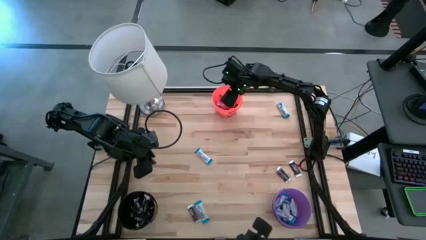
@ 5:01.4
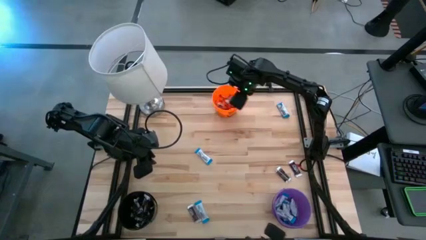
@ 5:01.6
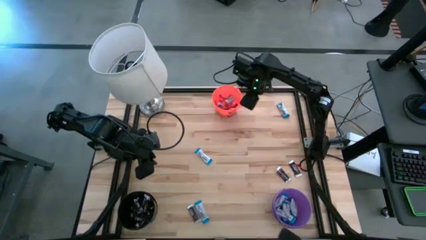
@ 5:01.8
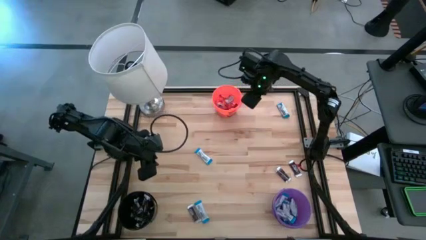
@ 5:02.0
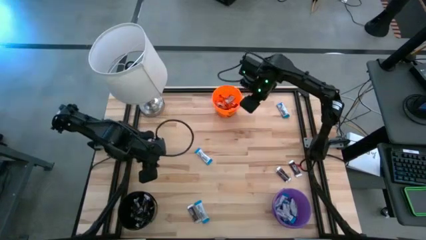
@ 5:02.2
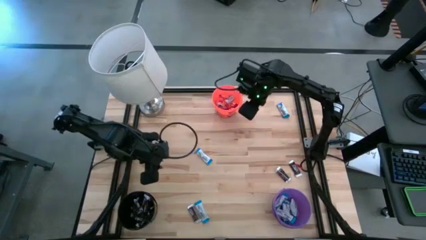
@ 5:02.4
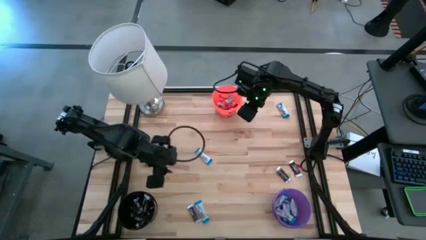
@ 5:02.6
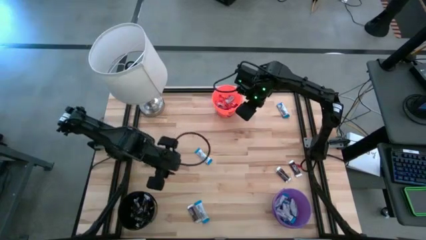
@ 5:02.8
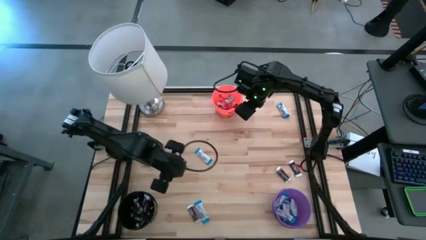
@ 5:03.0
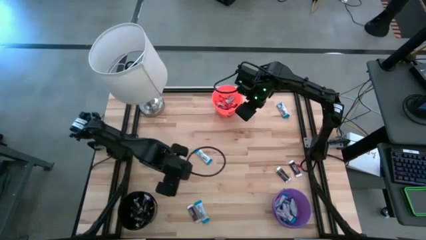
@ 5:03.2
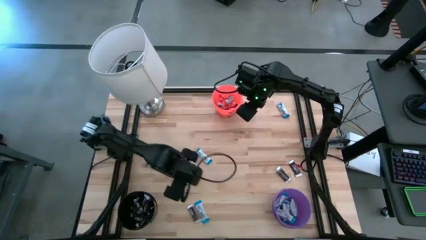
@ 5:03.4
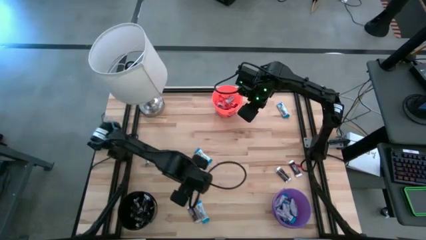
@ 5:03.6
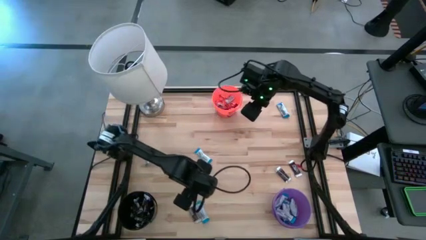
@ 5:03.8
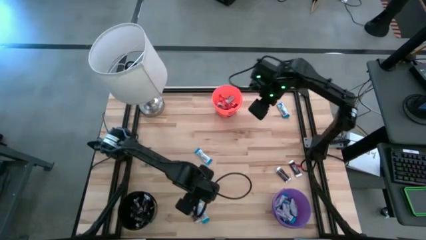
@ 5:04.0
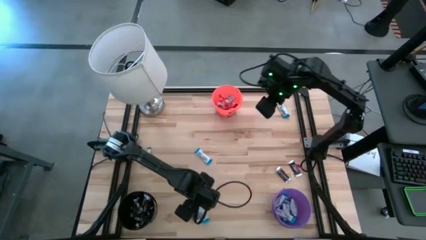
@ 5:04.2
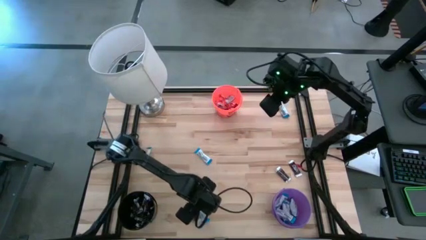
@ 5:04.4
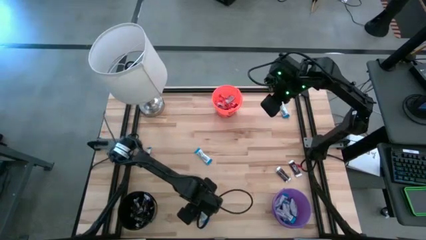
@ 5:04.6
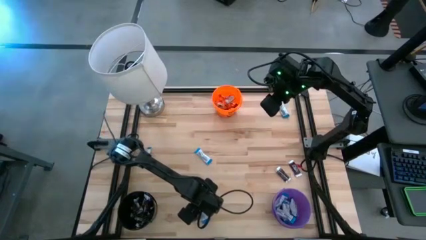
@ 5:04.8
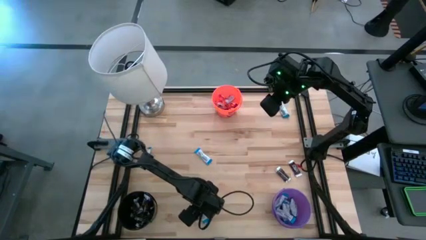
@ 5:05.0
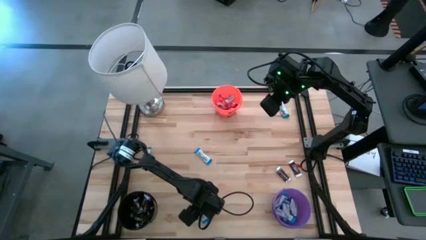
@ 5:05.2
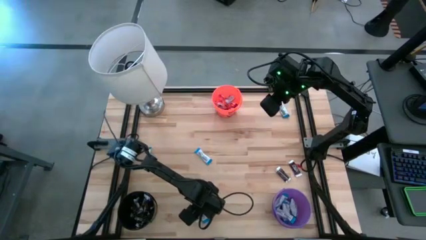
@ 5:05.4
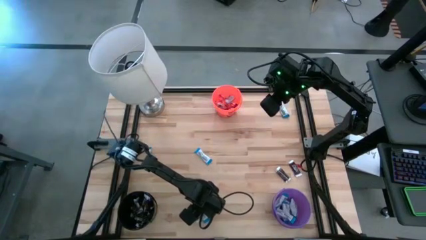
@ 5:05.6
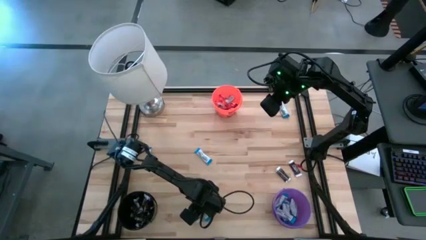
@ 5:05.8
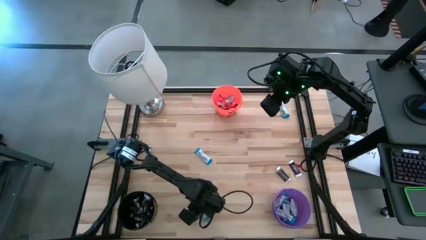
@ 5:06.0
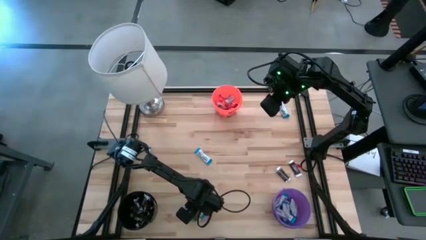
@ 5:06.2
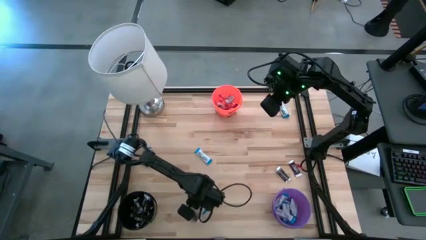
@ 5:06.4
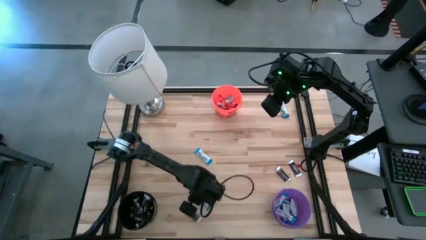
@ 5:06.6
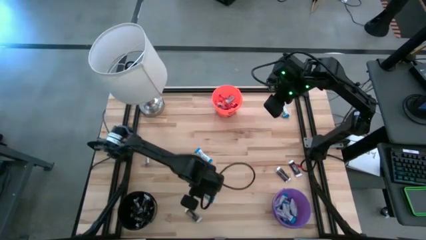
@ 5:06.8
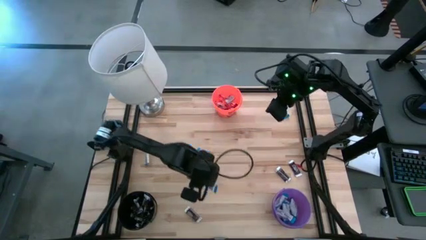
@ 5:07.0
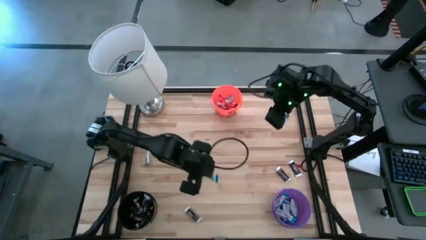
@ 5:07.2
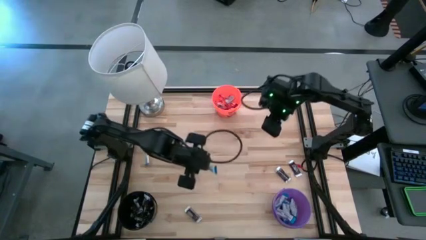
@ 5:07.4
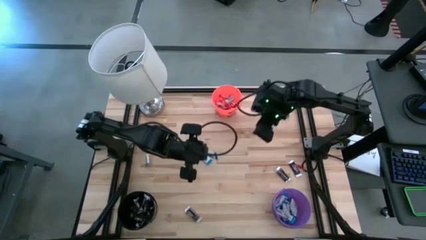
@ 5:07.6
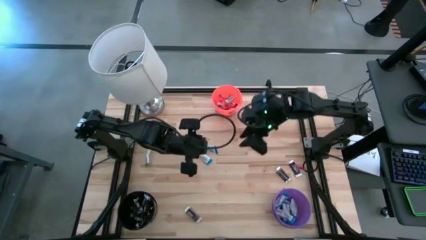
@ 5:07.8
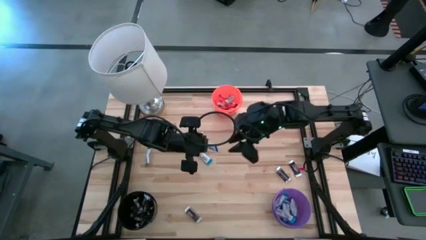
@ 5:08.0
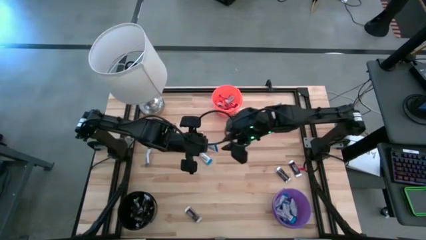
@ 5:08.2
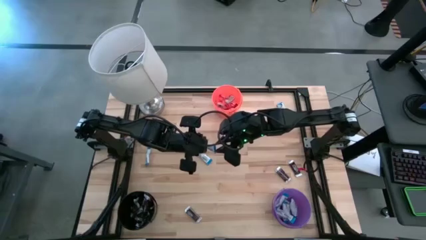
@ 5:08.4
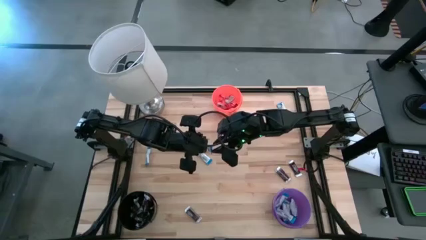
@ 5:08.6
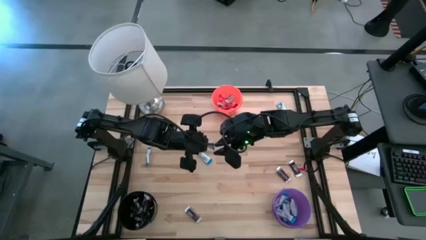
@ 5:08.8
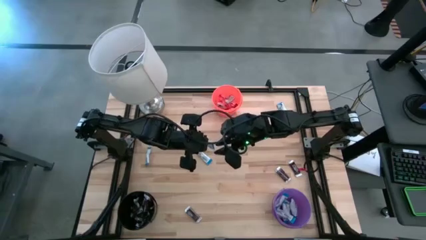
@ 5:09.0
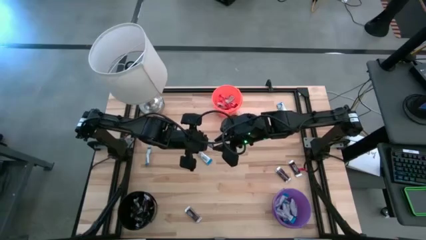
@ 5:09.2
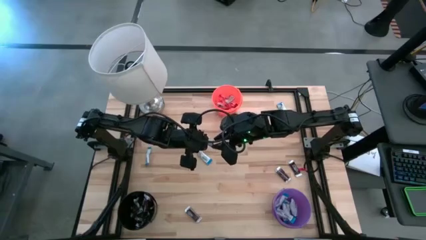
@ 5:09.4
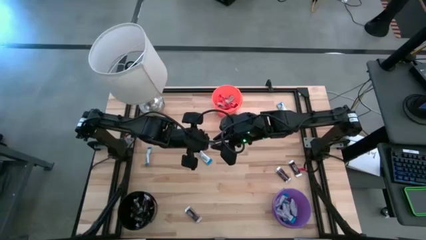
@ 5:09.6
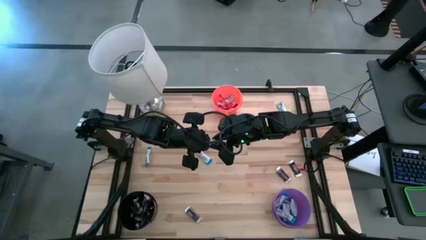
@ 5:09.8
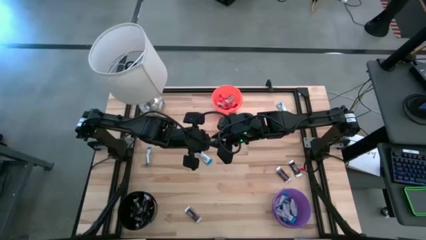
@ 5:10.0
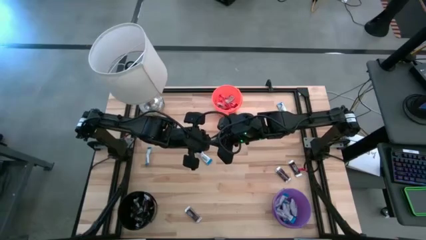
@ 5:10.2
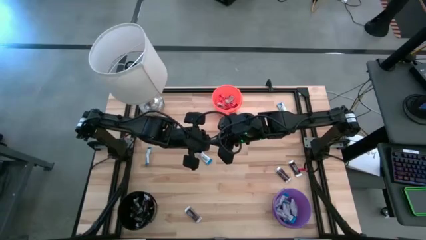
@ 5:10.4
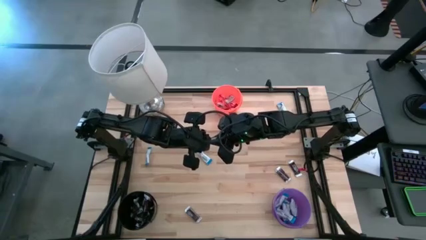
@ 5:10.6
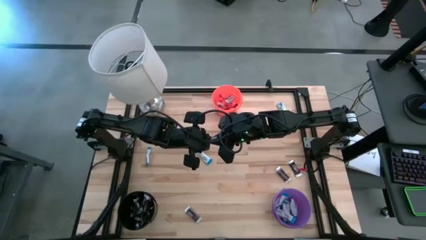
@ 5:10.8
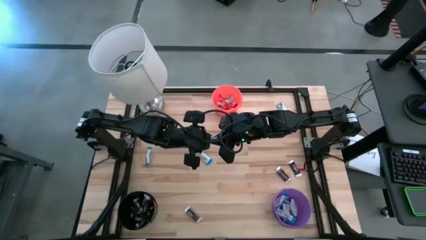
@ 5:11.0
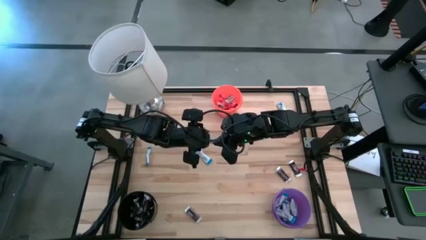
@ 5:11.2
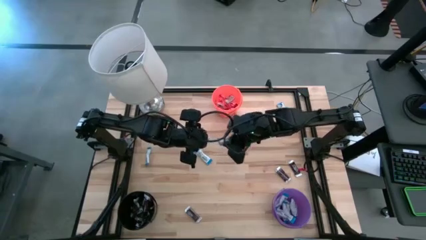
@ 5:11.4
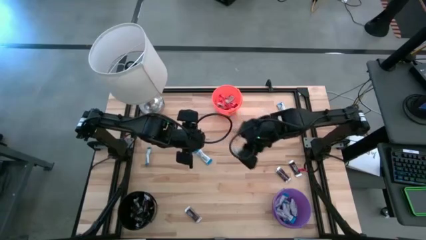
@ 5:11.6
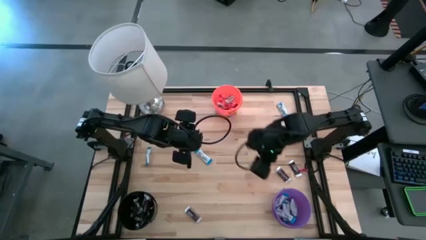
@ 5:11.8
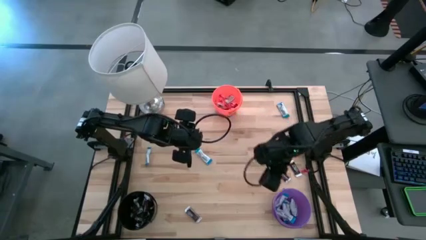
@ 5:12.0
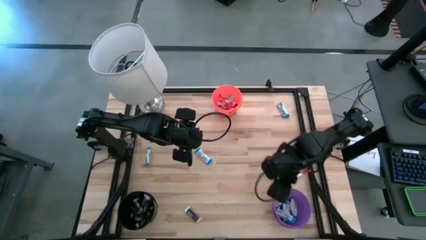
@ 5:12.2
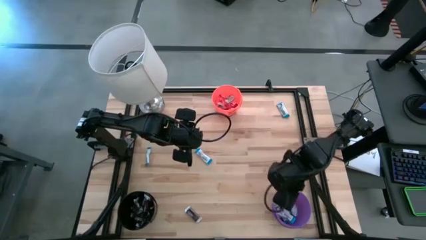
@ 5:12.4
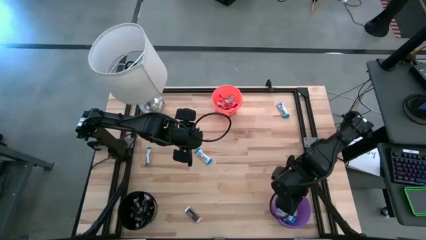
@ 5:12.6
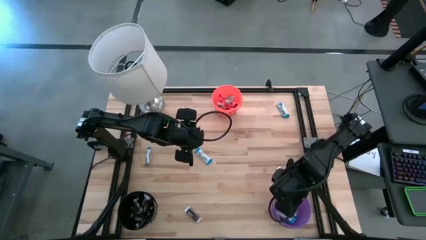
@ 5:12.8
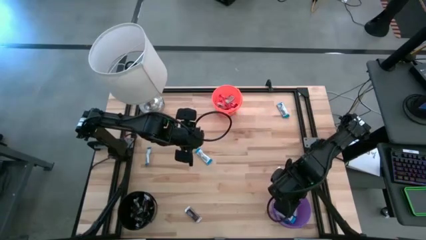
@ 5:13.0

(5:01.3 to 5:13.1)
Task: Organize candy in baskets
Put the white chocolate into the purple bucket
